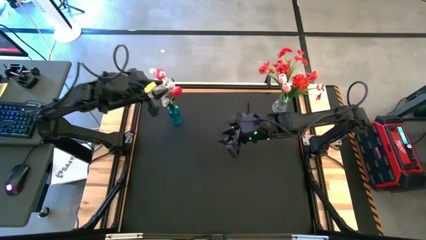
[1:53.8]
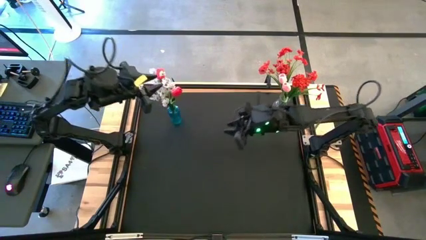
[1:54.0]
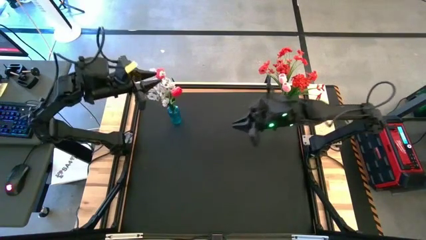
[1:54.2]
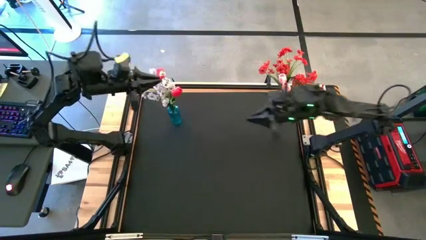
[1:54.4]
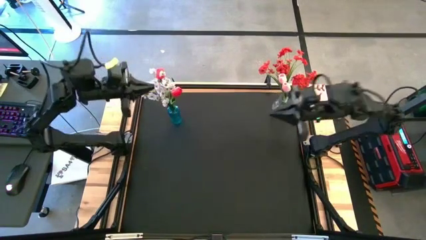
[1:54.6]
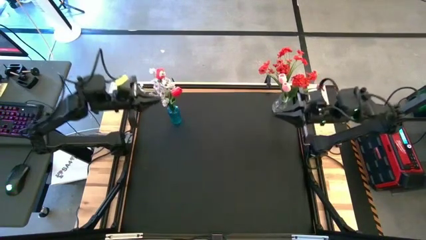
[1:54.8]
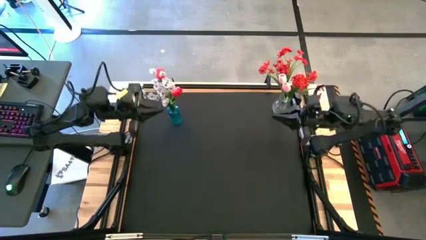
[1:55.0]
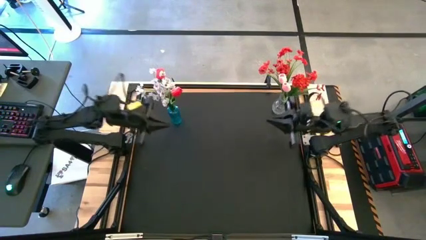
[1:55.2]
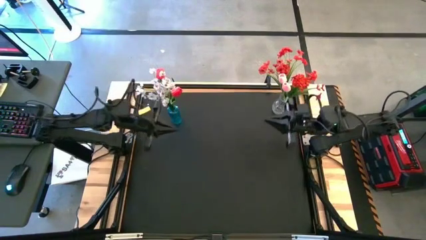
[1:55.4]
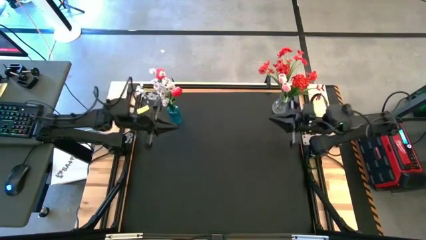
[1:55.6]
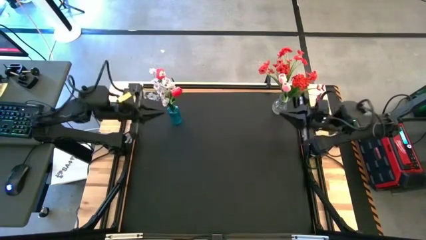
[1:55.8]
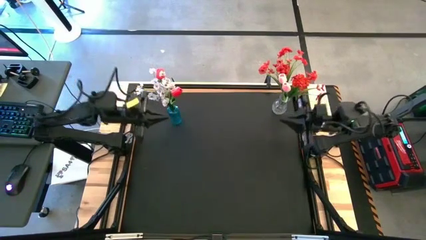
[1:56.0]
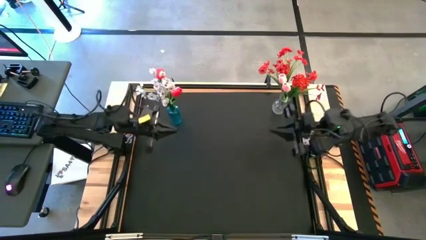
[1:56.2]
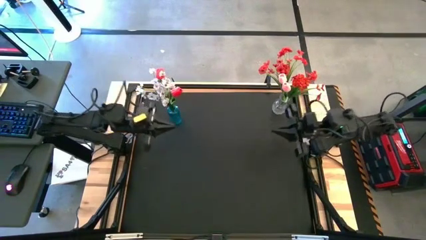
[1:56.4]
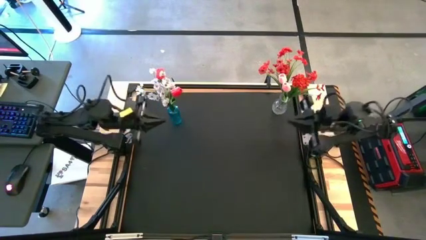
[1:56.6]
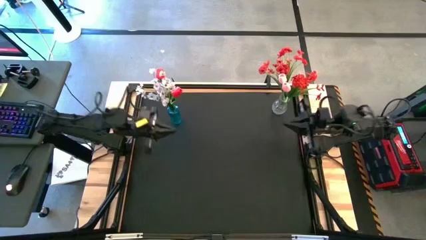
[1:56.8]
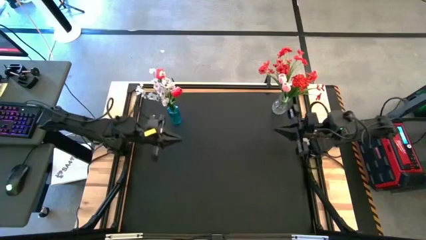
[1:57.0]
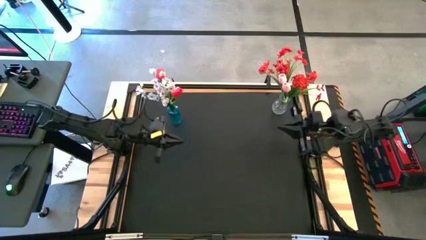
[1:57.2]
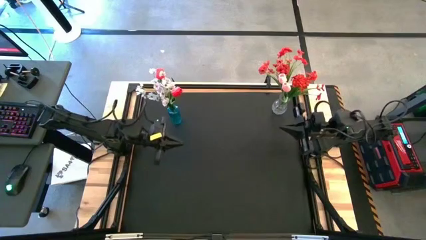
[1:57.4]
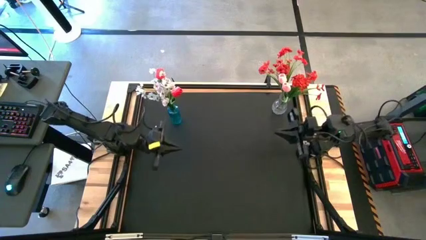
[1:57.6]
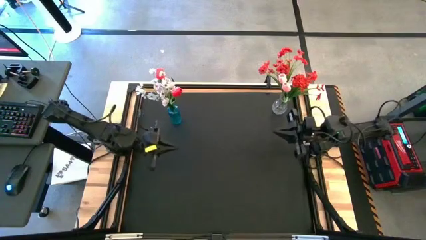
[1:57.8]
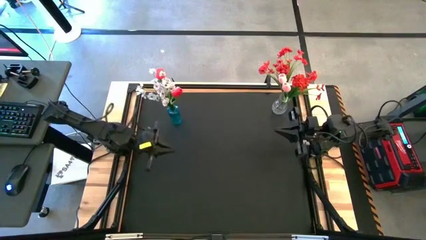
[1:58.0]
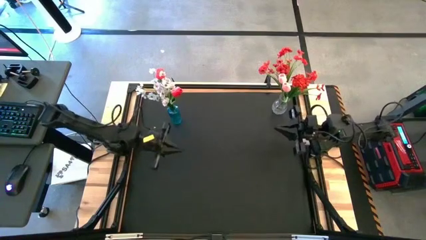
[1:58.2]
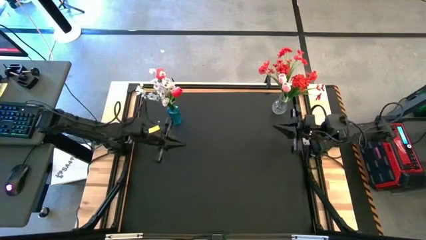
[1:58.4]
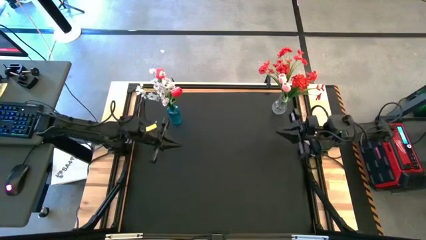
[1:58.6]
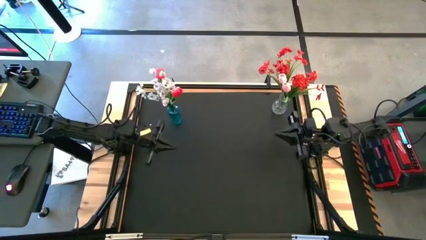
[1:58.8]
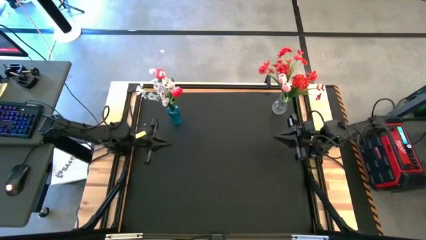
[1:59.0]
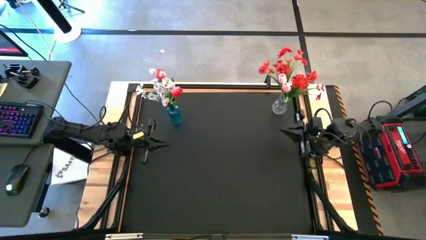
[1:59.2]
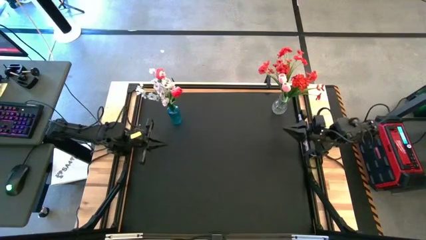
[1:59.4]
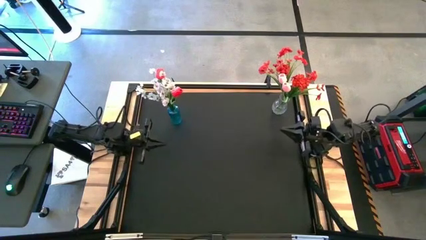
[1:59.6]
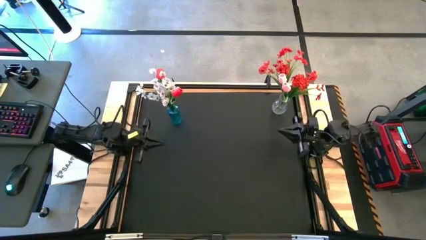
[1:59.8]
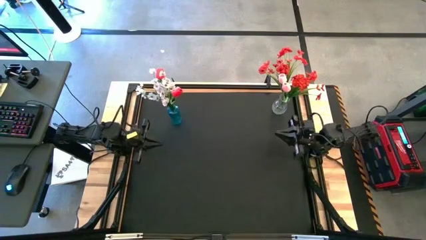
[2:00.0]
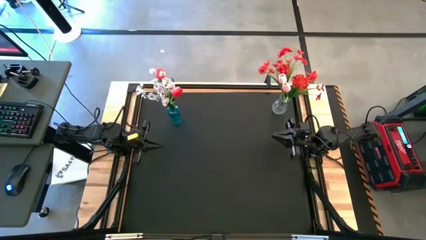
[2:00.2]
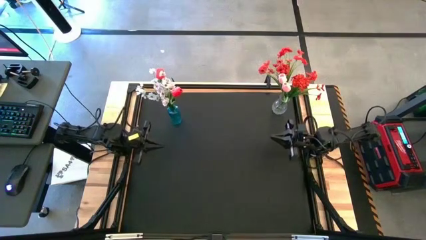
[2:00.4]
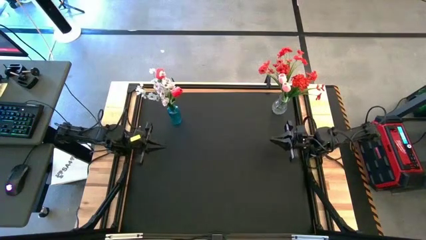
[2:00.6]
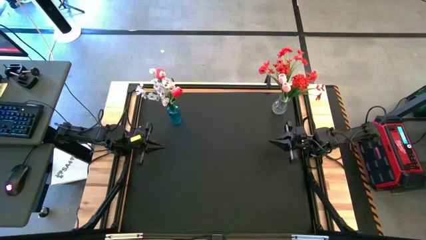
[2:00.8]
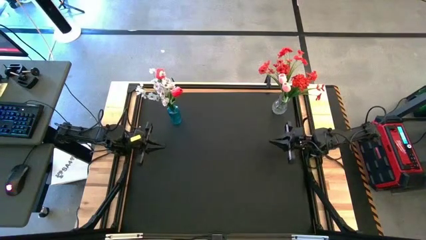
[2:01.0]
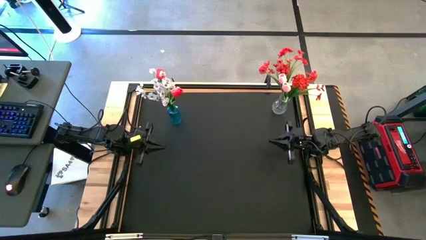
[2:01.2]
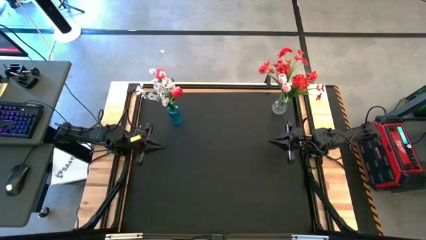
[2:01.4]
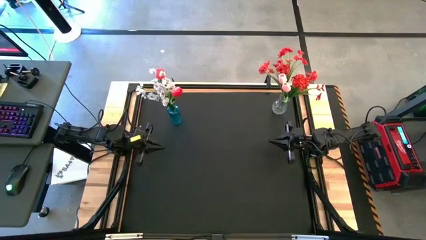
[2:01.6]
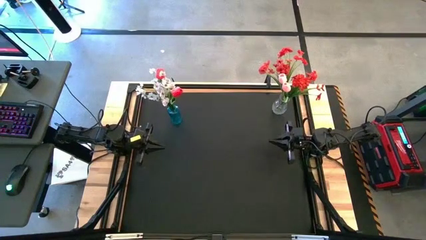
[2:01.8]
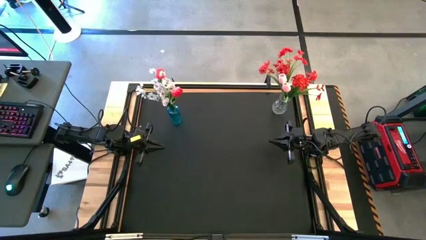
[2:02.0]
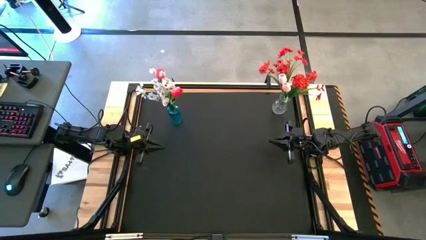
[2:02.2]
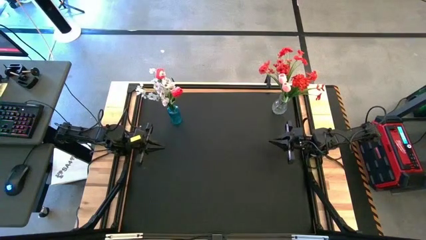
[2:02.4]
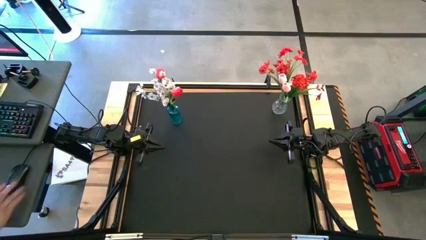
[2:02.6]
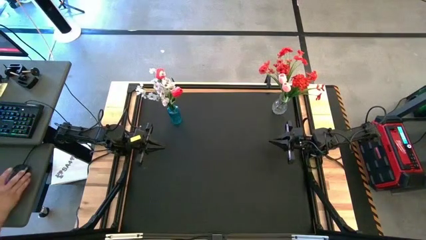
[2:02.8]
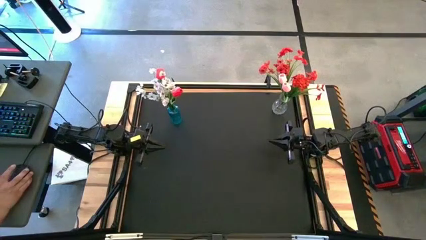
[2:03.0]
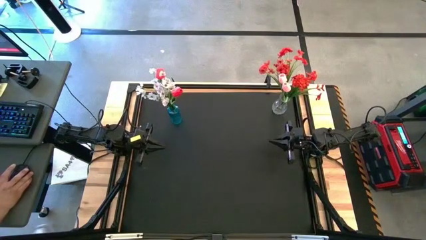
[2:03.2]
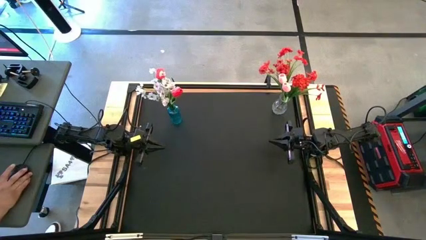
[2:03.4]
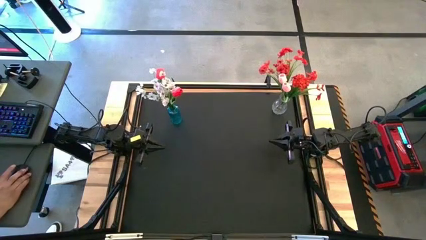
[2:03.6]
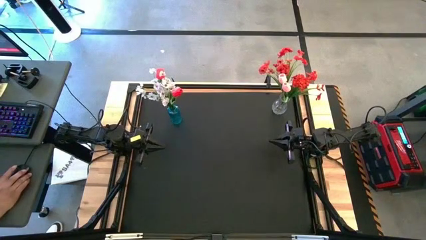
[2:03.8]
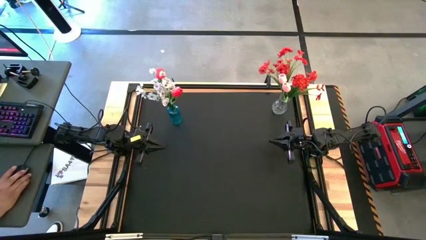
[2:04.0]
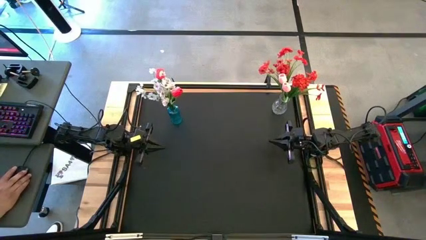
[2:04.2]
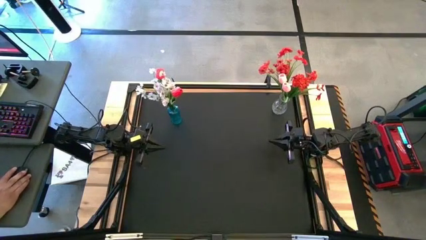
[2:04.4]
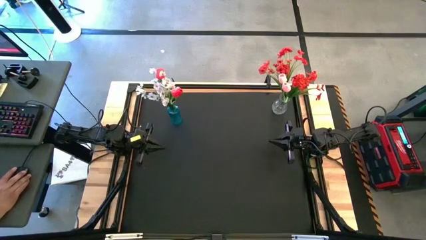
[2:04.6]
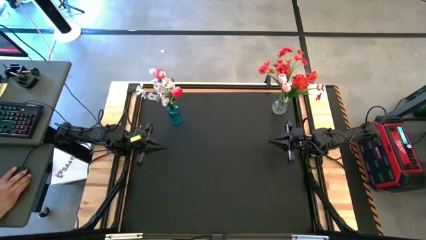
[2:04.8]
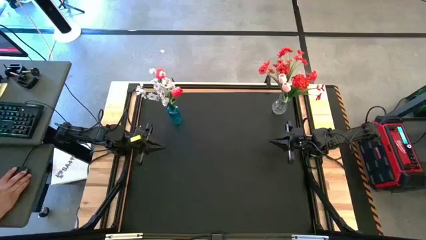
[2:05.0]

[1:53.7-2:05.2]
Task: Sort flowers into vase by color
Return to Home Position
